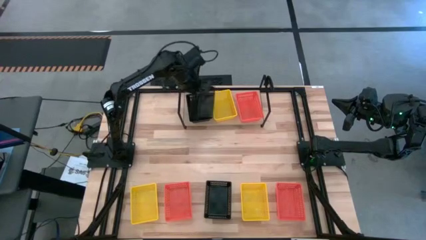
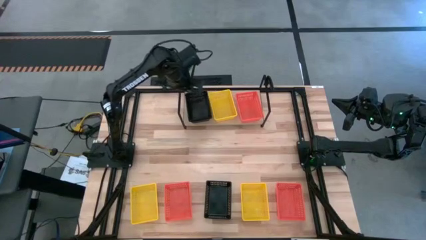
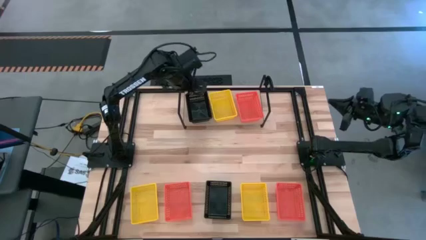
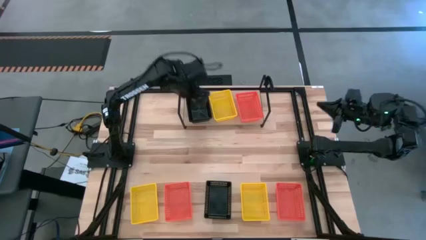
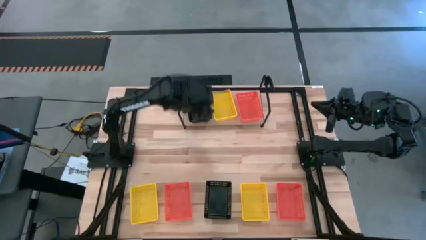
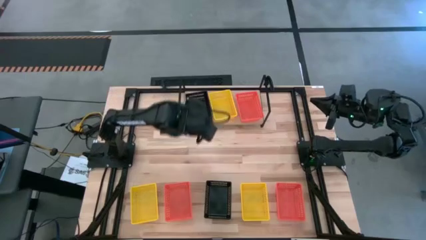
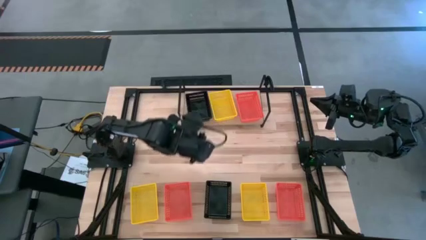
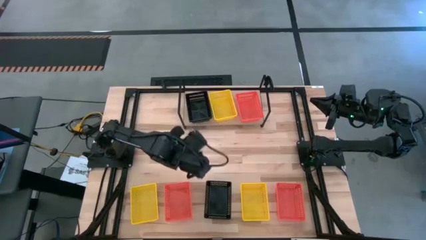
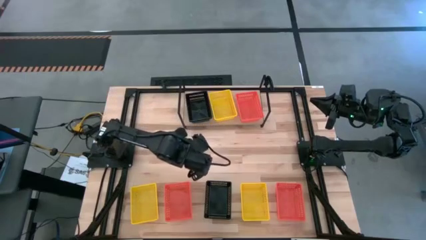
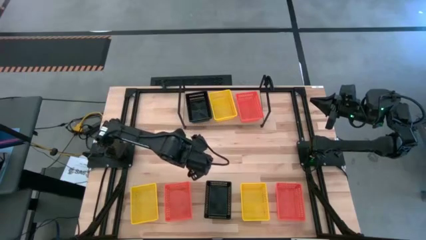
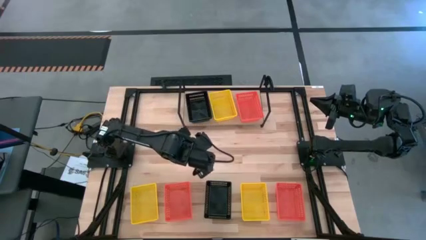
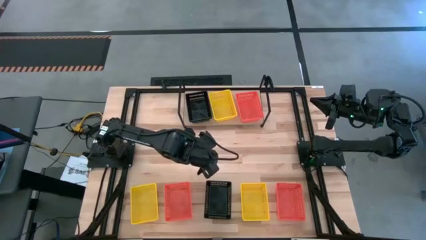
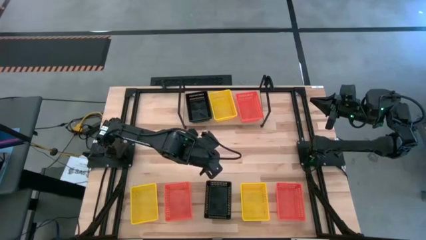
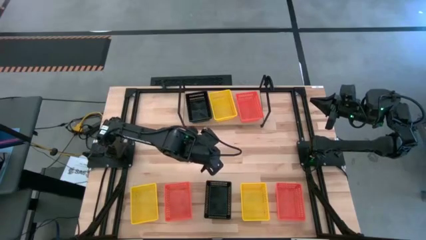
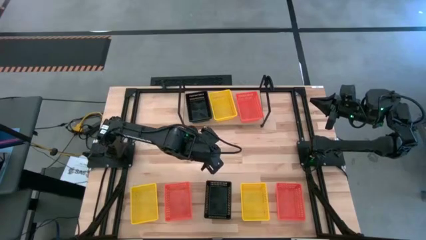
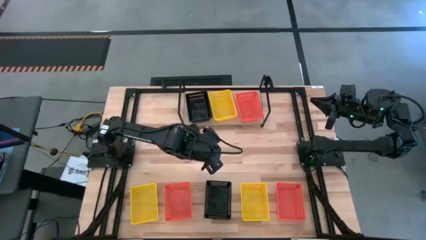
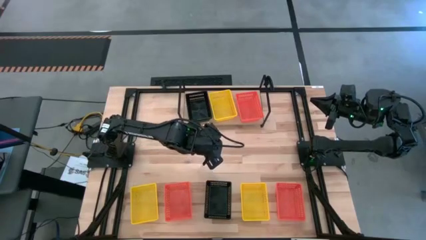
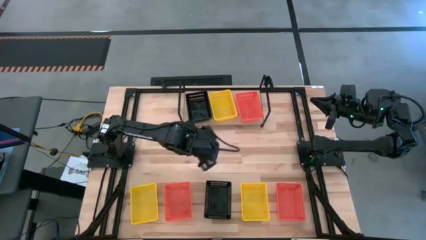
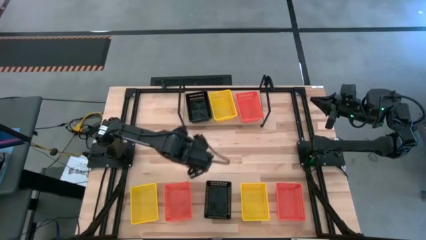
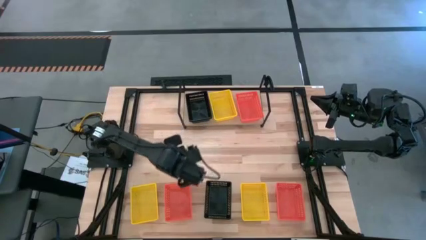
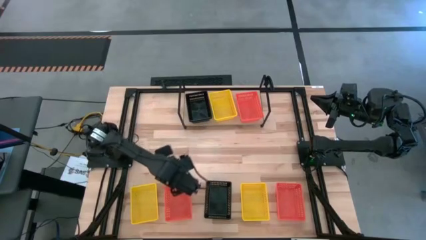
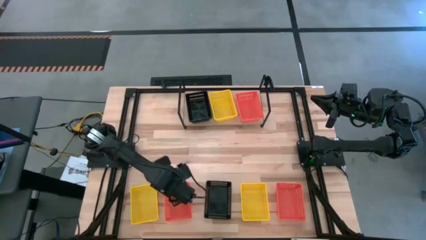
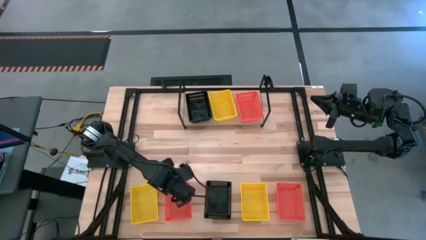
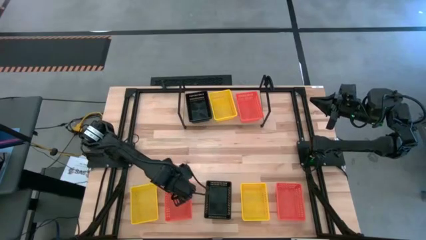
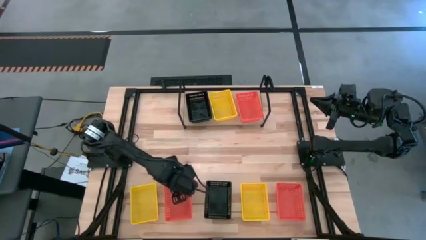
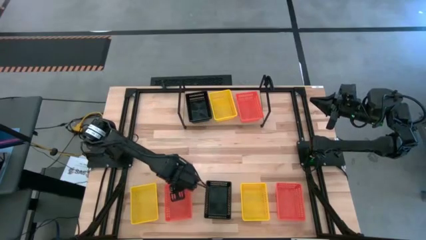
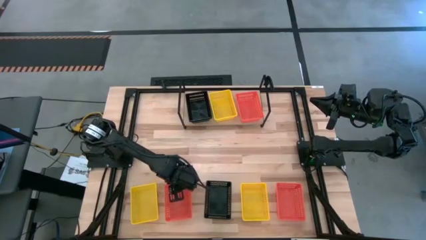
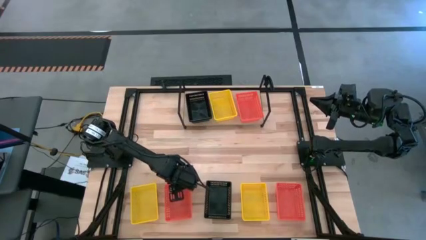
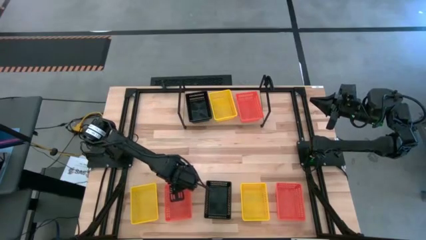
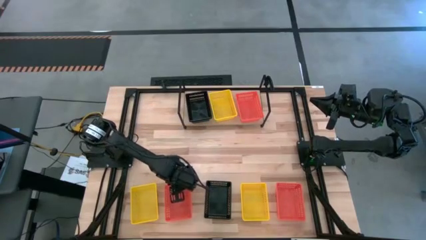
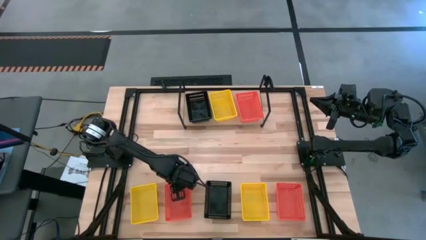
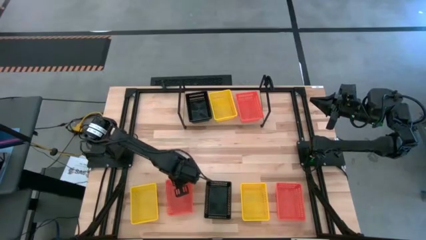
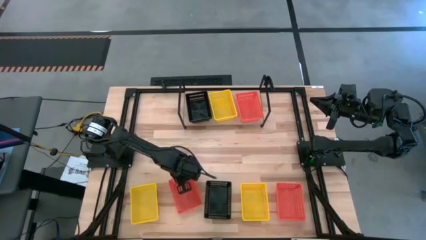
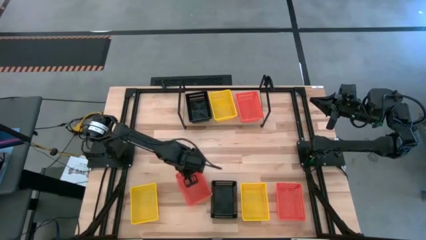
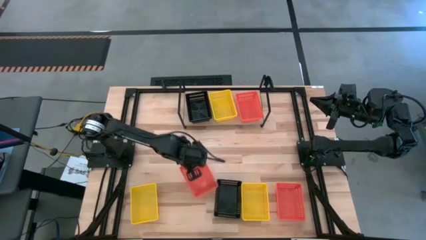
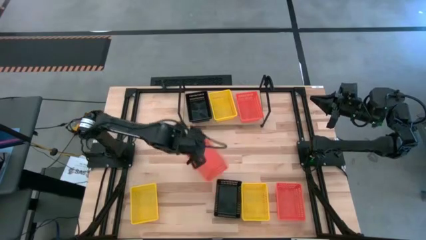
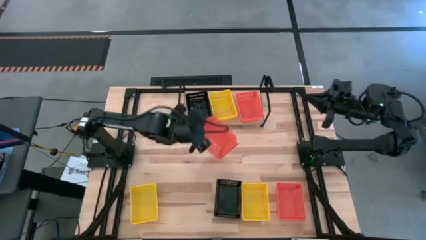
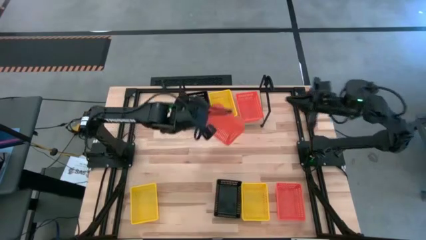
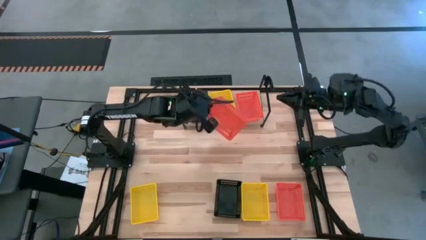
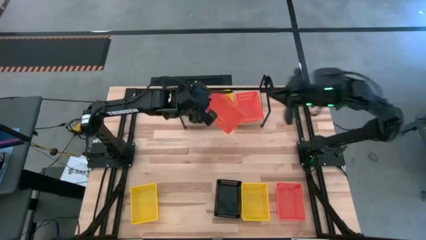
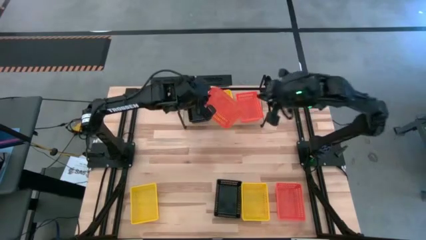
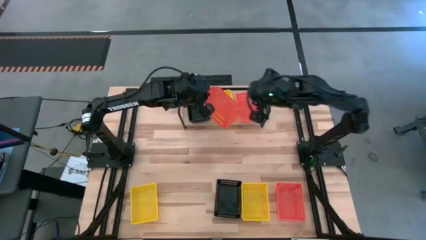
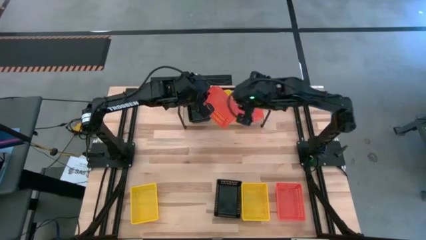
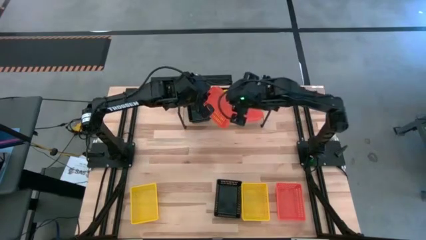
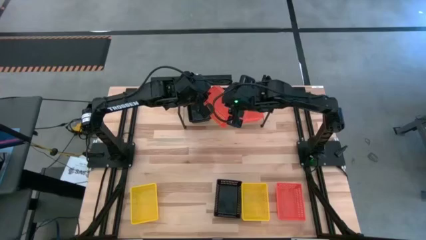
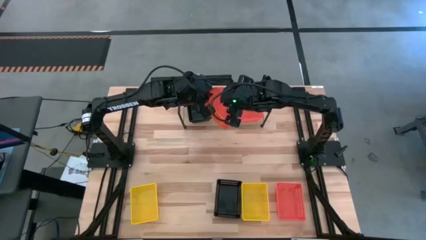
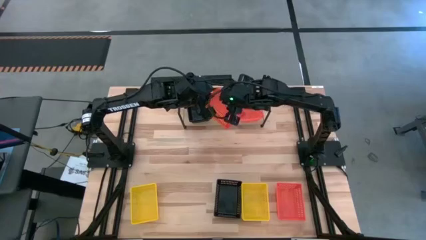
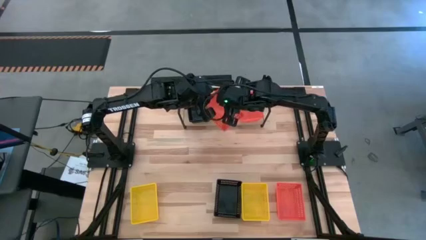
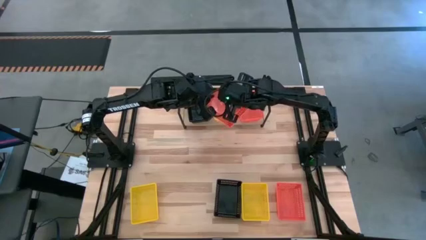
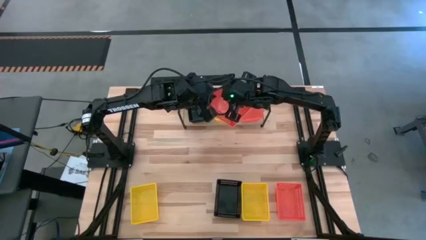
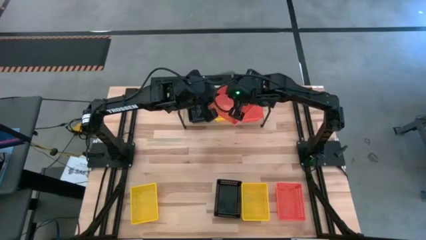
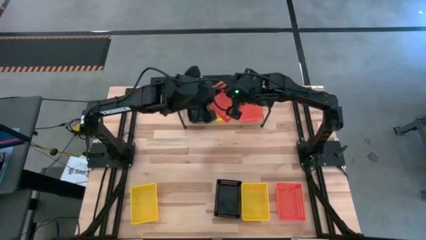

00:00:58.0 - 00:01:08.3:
Task: Stack baskets on shelf by color
Stack the left orange bin on top of the other orange bin on the shelf

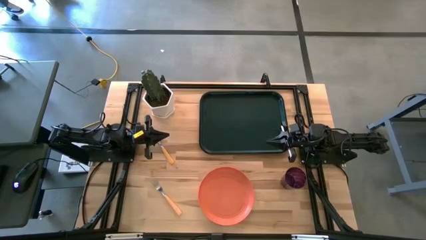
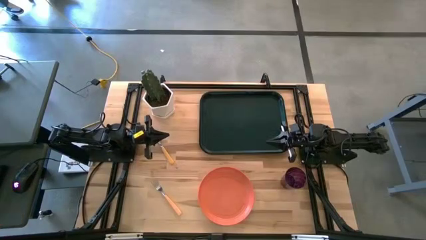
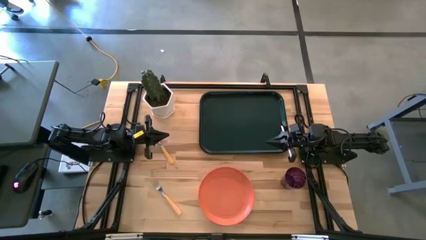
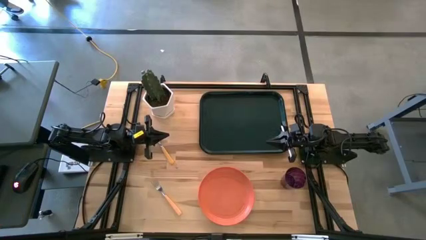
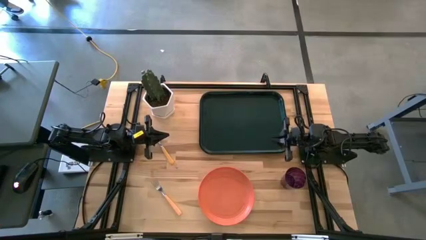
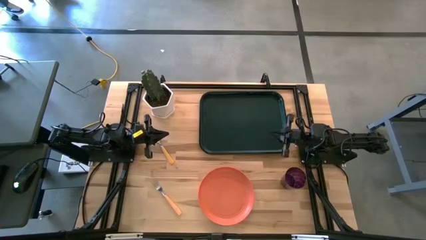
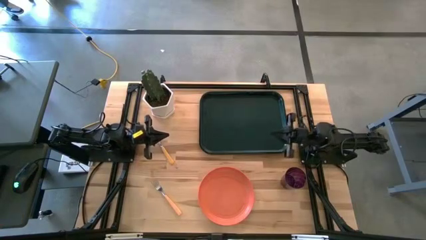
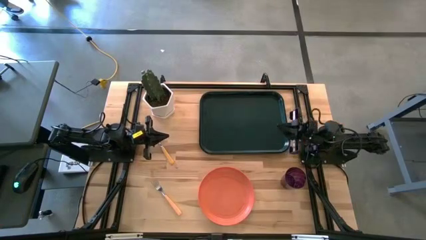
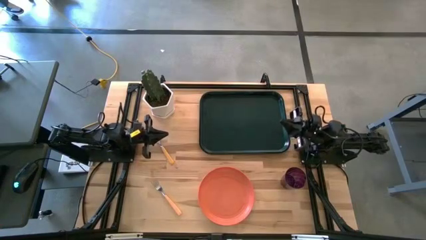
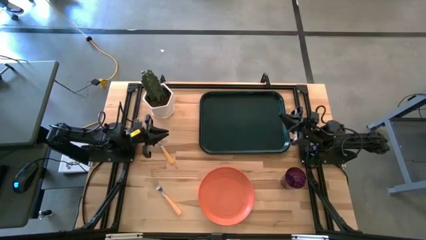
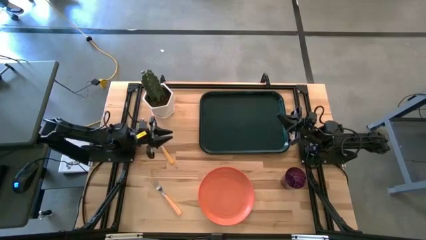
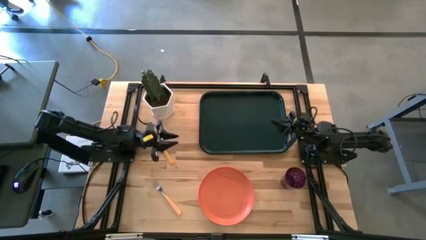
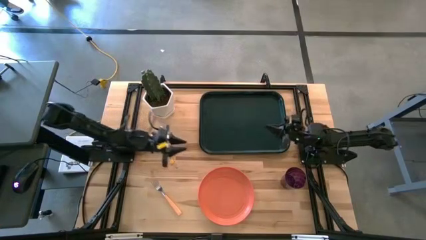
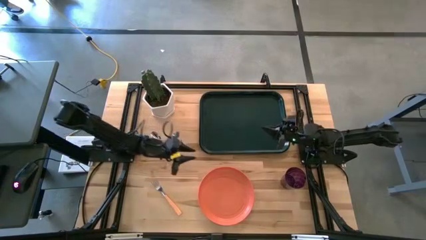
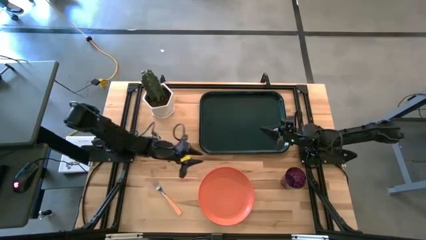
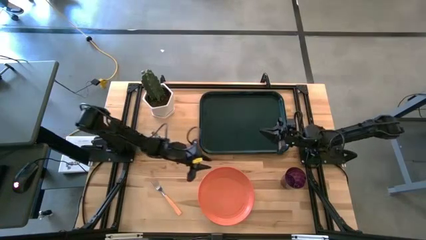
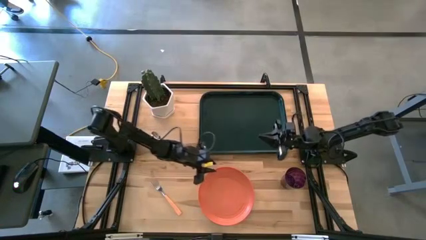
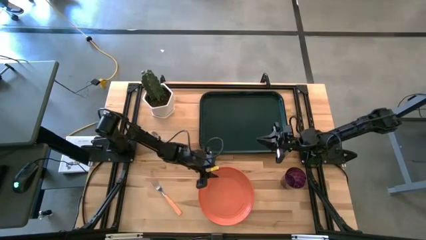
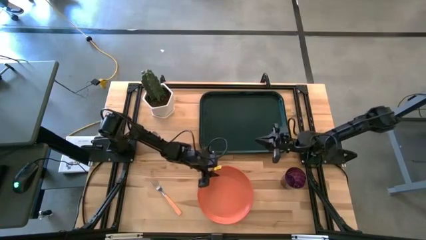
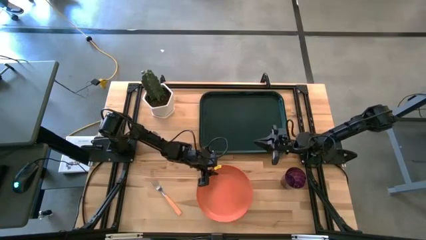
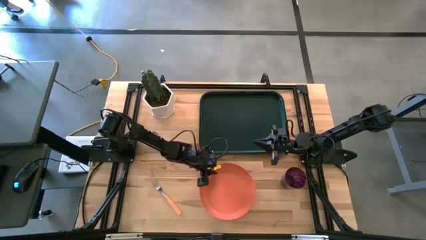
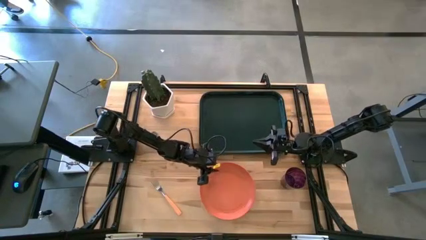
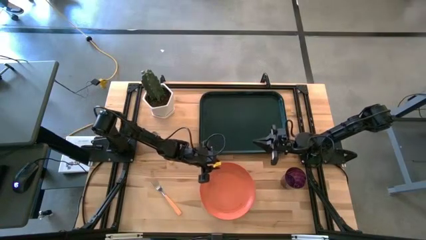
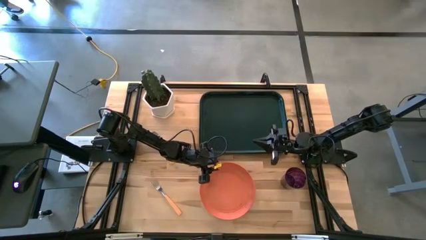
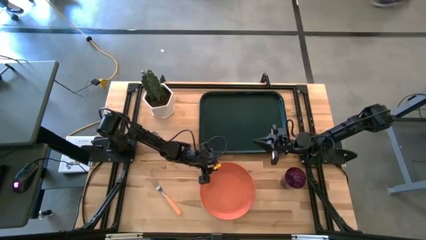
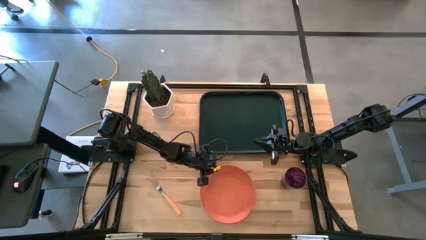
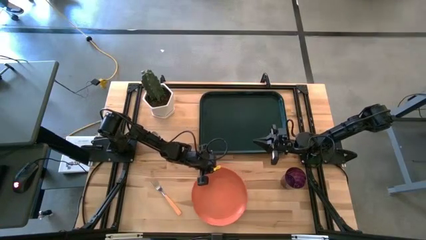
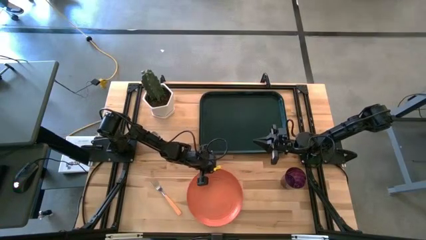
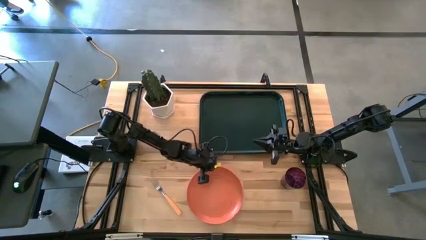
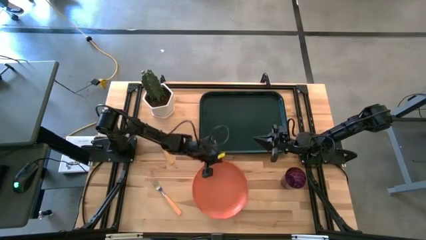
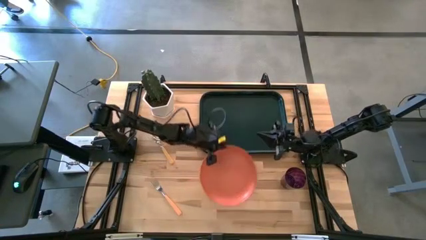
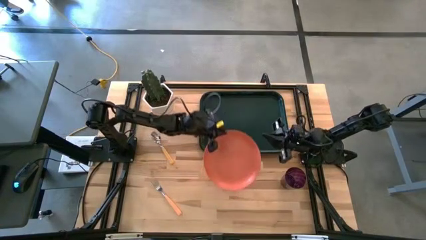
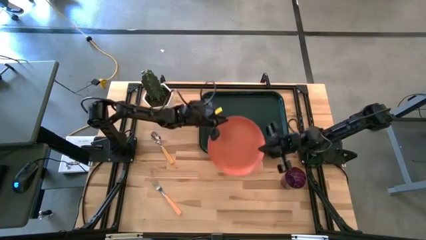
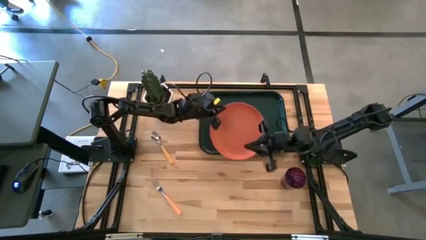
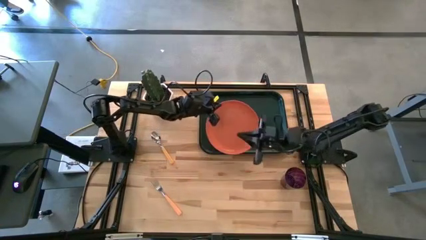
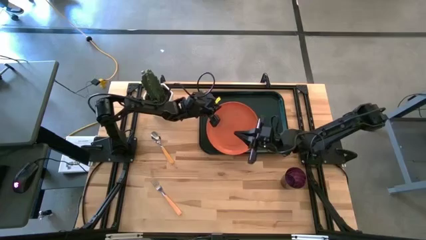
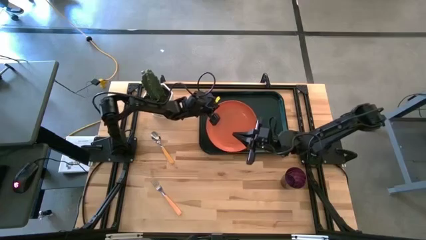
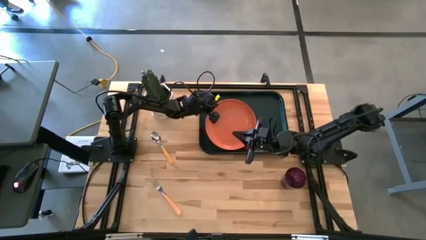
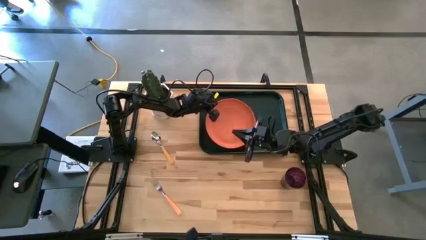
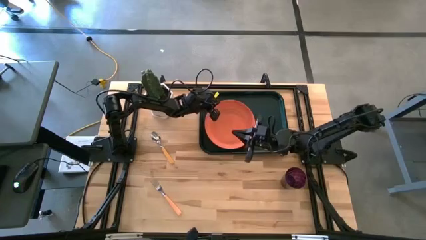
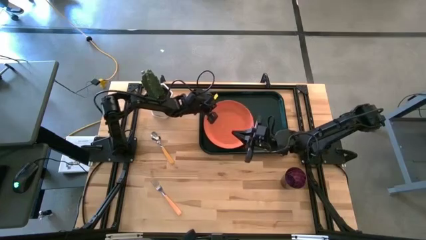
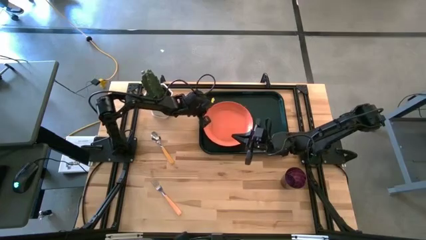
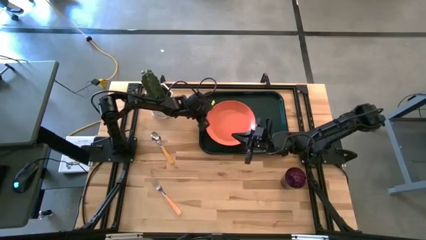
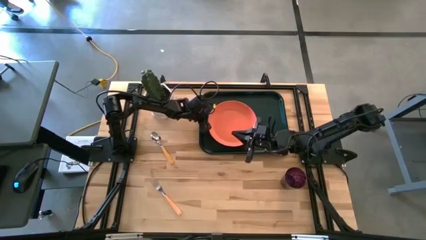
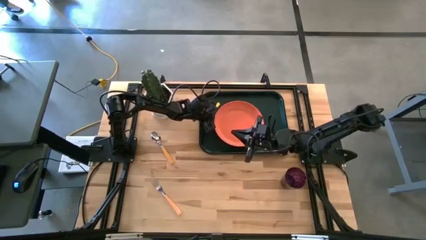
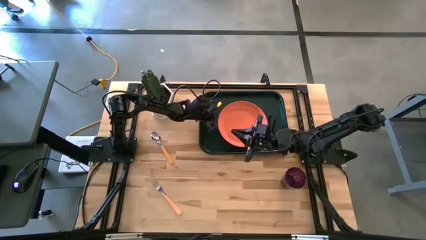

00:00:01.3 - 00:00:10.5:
Task: Pick and place plate/cup/fork/spoon on tray
Put the orange plate on the black tray
